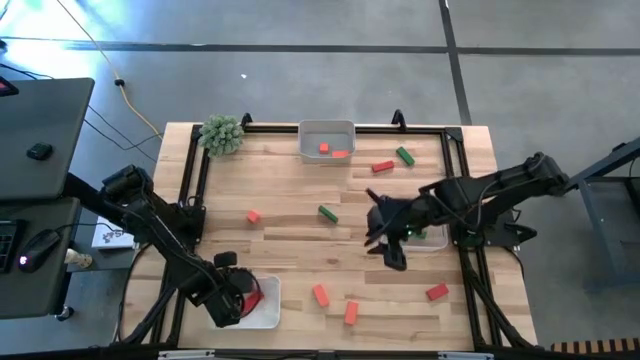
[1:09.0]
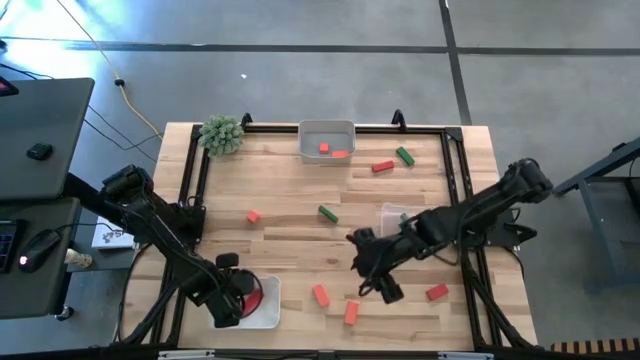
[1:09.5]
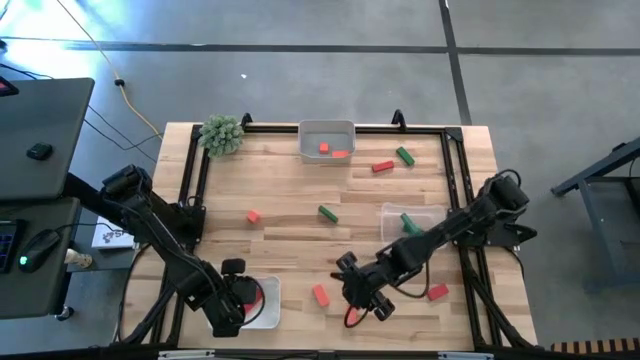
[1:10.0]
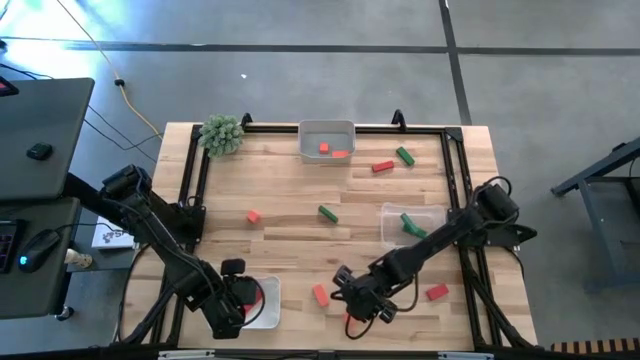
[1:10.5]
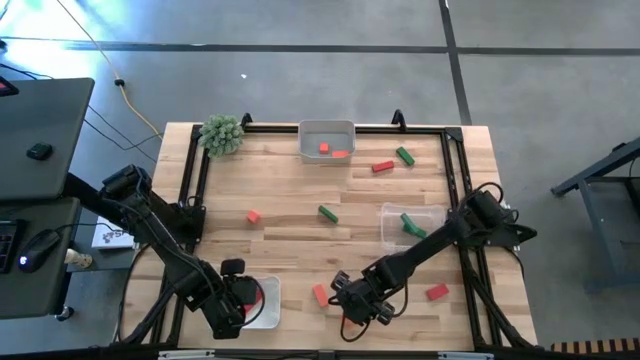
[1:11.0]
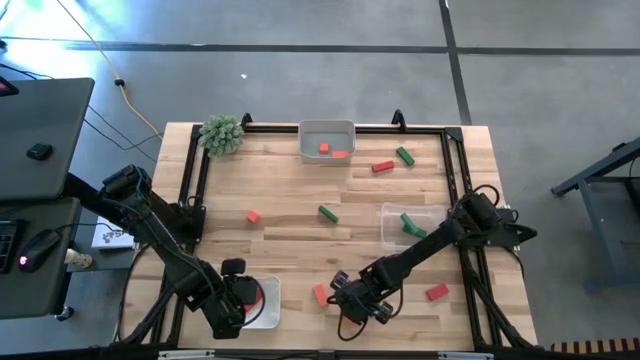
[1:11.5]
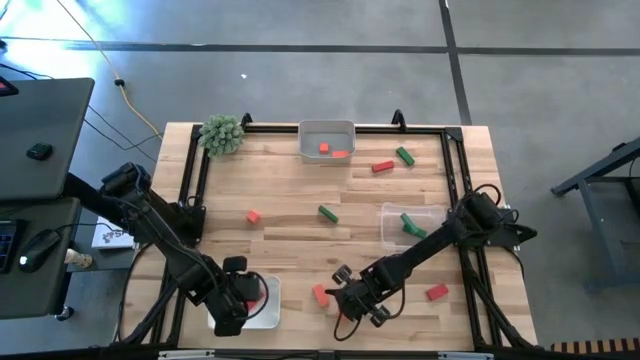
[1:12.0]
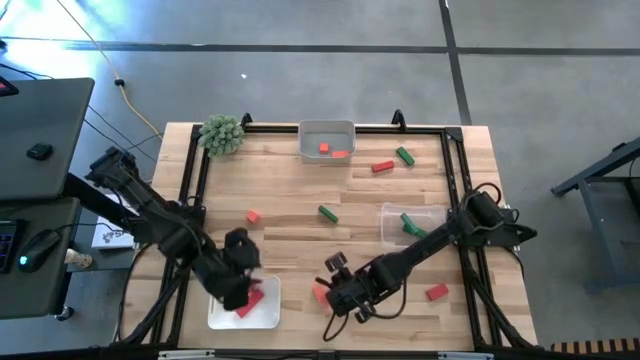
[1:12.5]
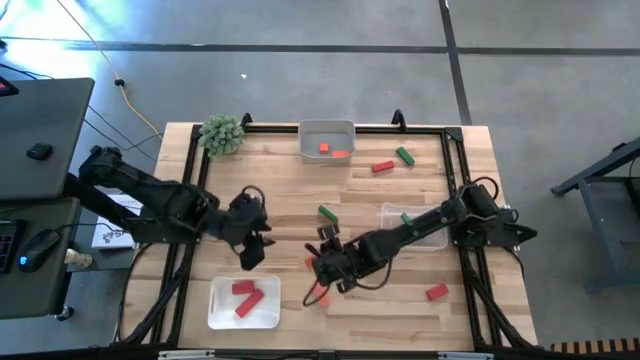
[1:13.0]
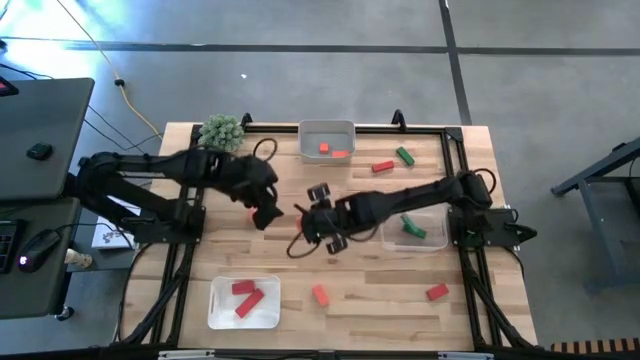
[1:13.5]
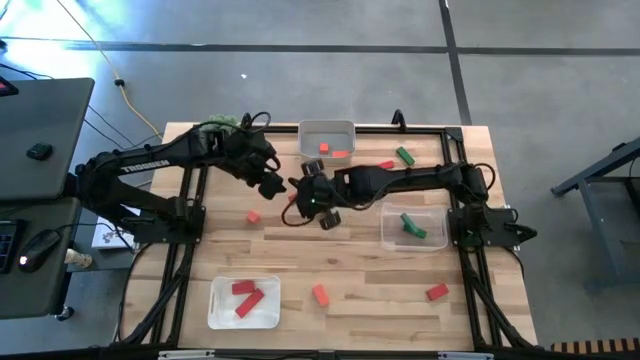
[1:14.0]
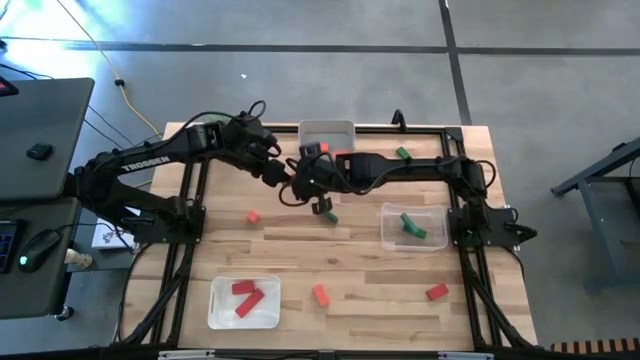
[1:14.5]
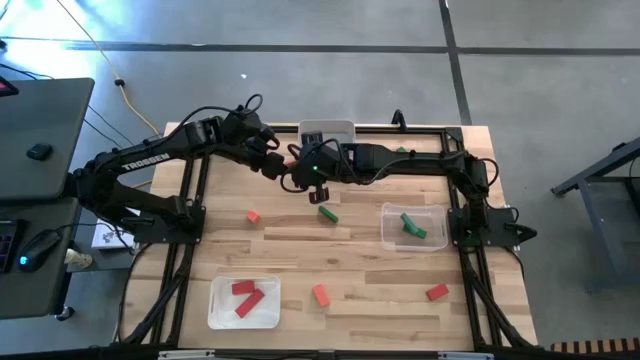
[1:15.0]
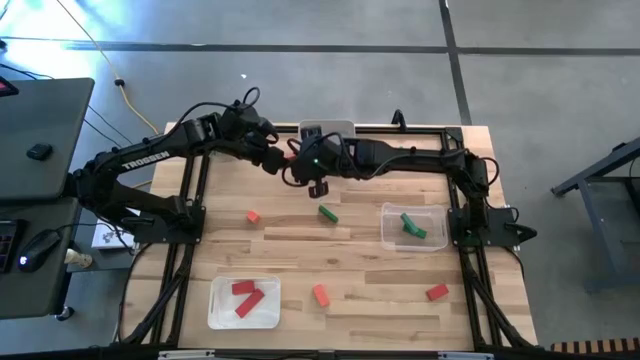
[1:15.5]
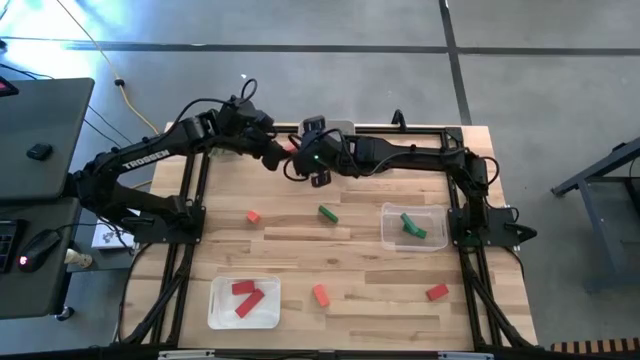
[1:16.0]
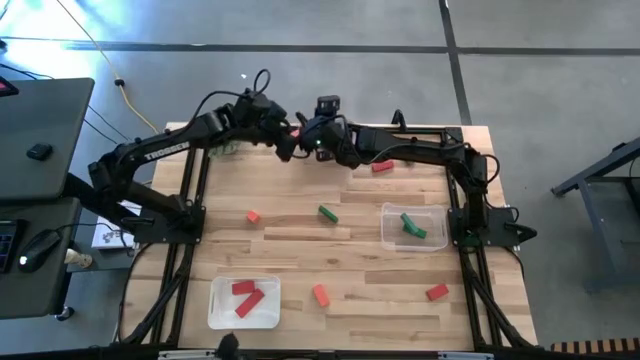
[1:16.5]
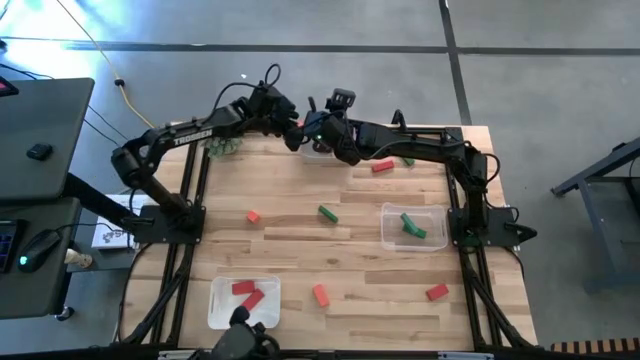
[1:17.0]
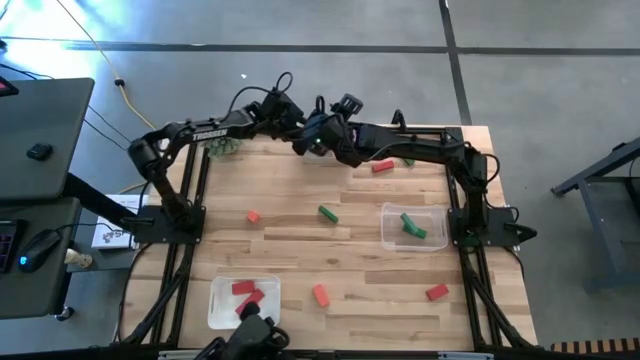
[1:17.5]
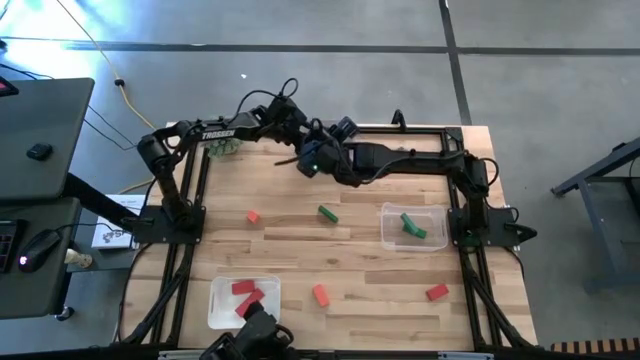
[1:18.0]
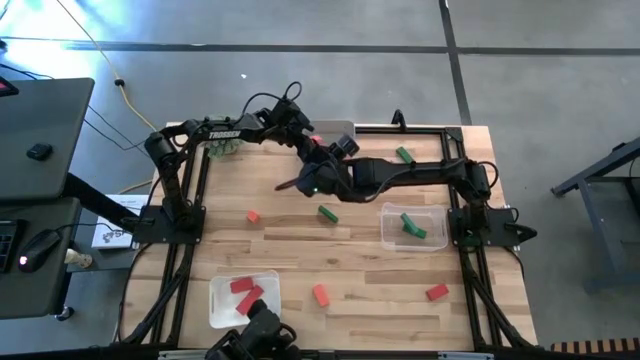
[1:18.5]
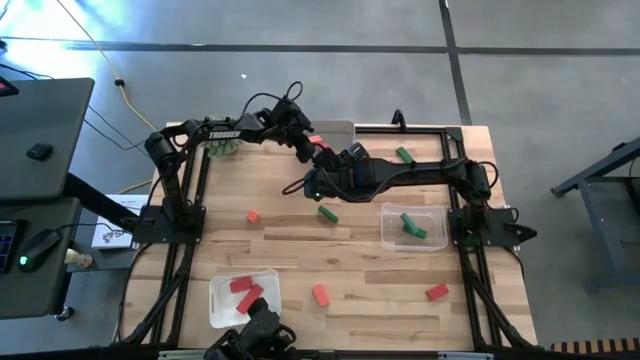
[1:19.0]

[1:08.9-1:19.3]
Task: Sort & place blocks by color
Put the orange wooden block into the gray bin

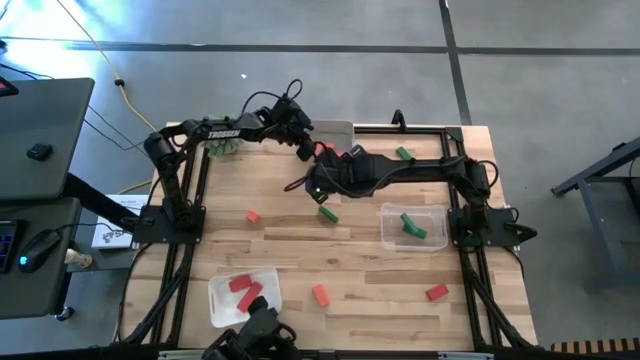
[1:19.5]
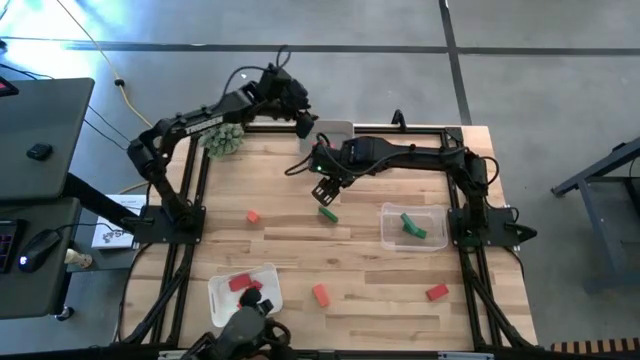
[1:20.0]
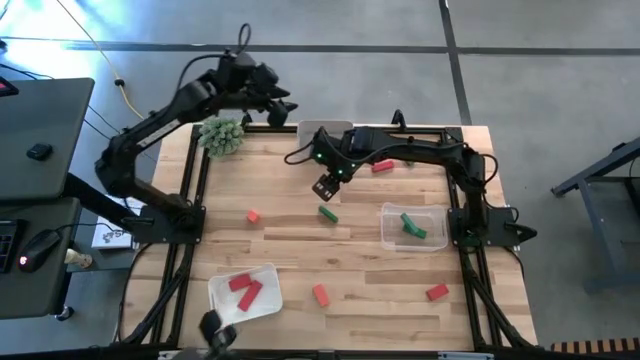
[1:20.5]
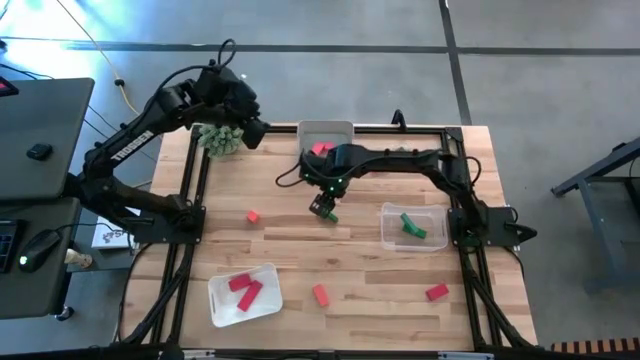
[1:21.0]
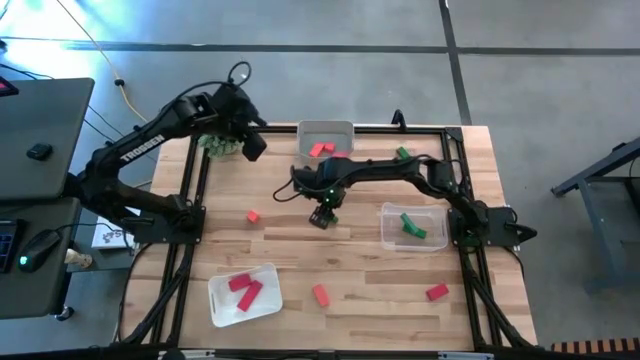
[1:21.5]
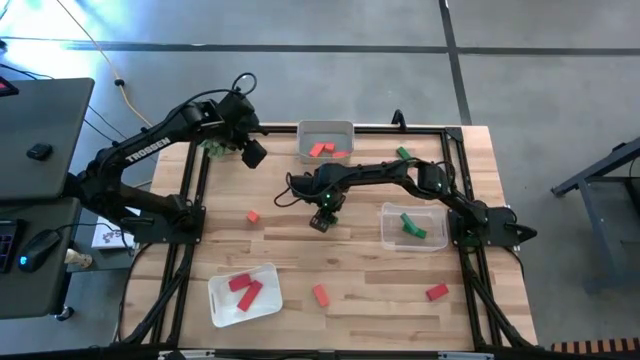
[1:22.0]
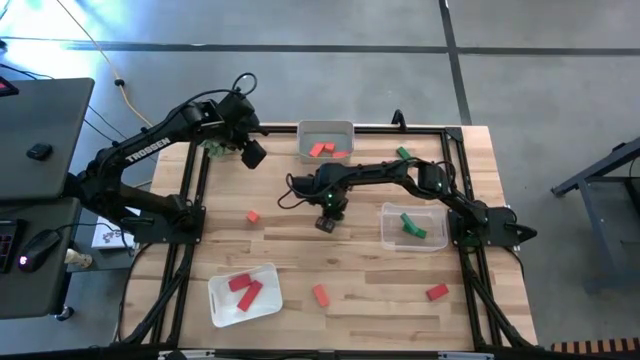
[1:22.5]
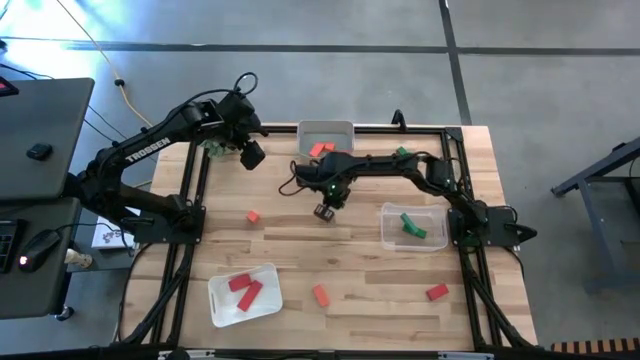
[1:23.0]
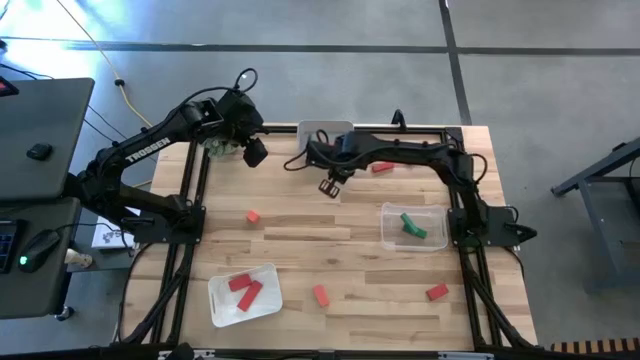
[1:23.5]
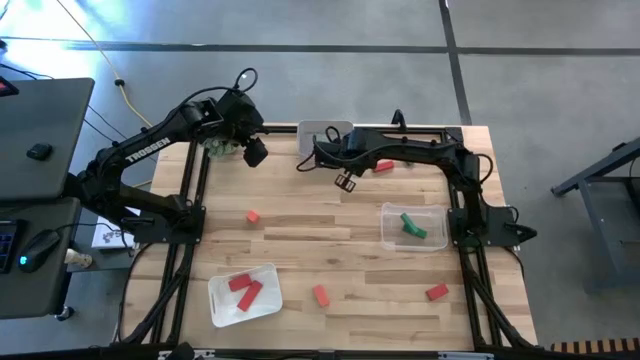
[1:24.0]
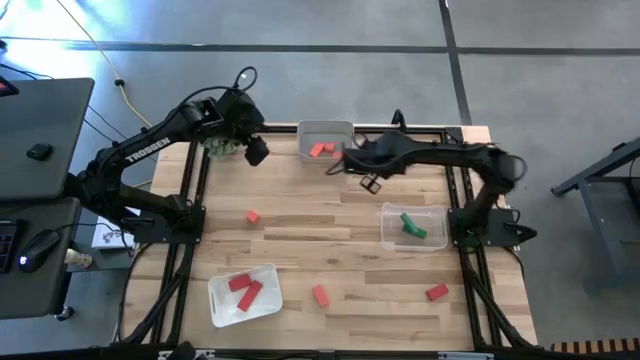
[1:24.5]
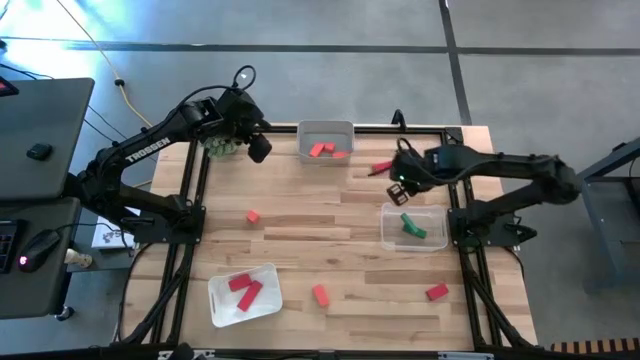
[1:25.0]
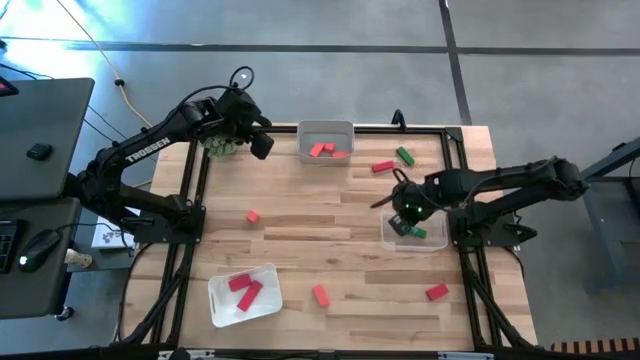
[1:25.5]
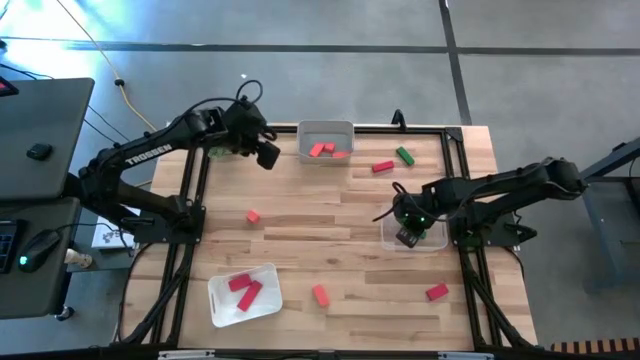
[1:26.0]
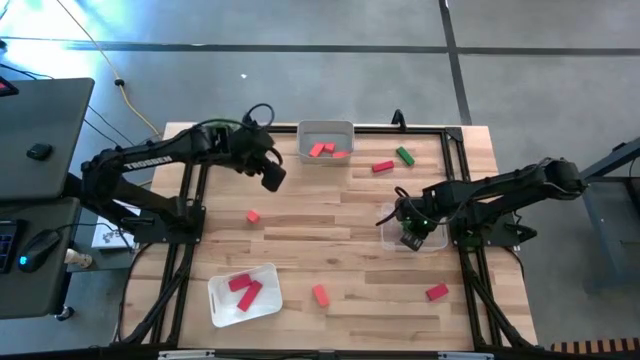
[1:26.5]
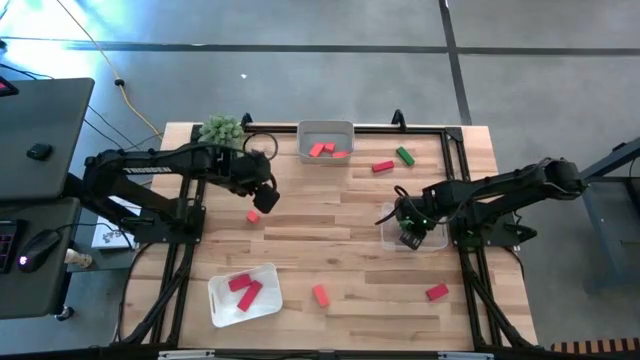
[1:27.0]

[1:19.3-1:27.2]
Put the green wooden block into the transparent bin

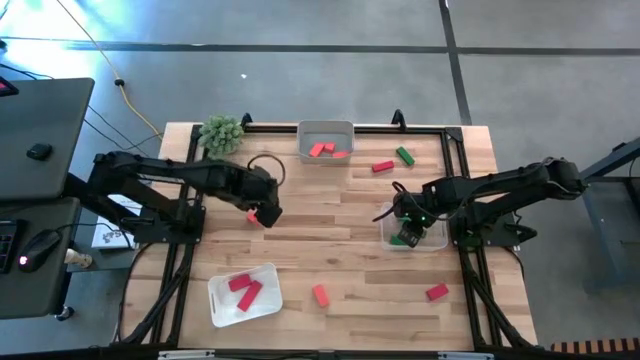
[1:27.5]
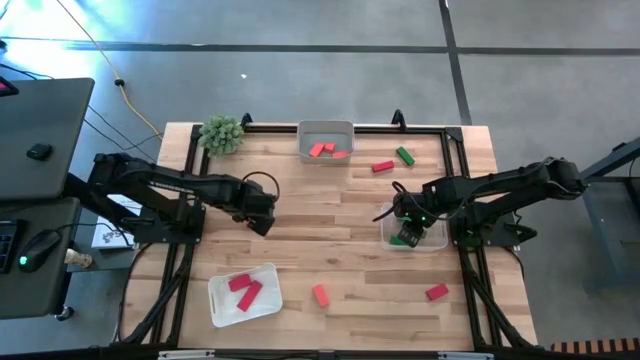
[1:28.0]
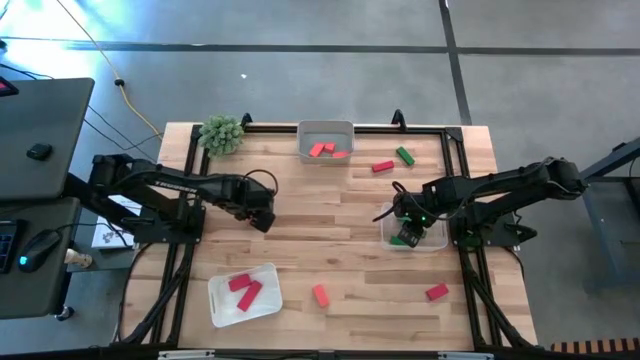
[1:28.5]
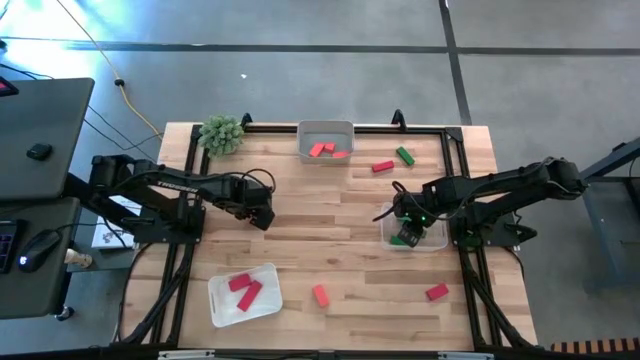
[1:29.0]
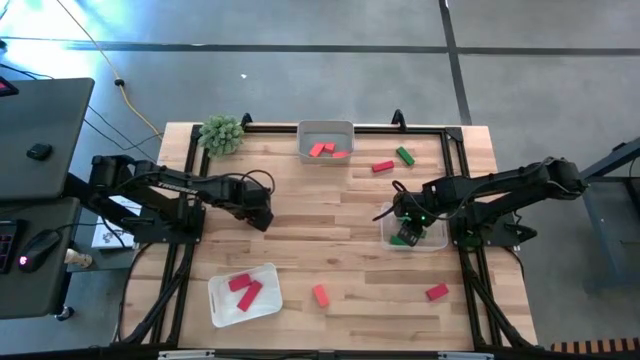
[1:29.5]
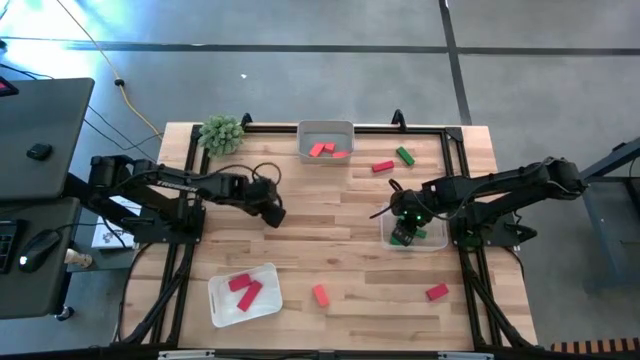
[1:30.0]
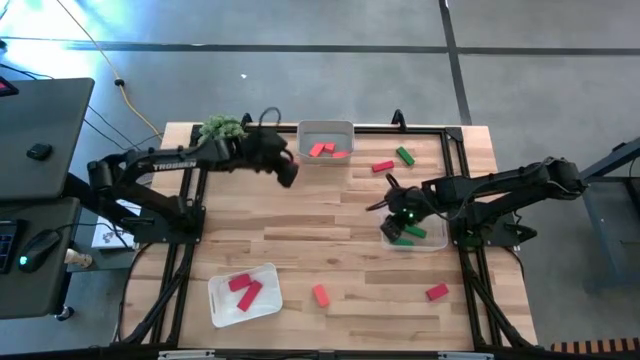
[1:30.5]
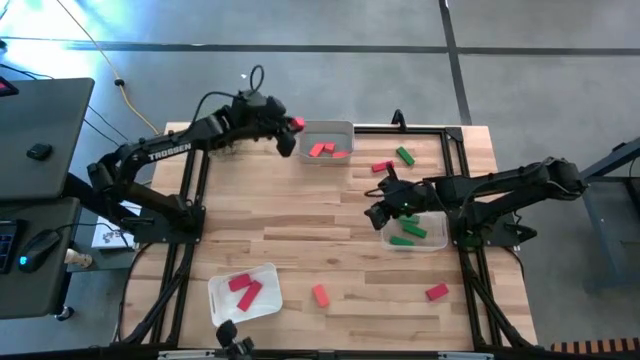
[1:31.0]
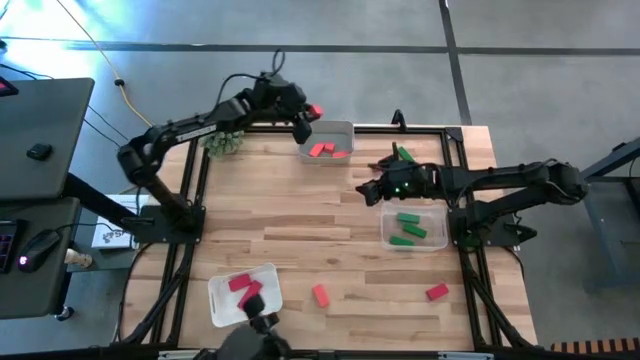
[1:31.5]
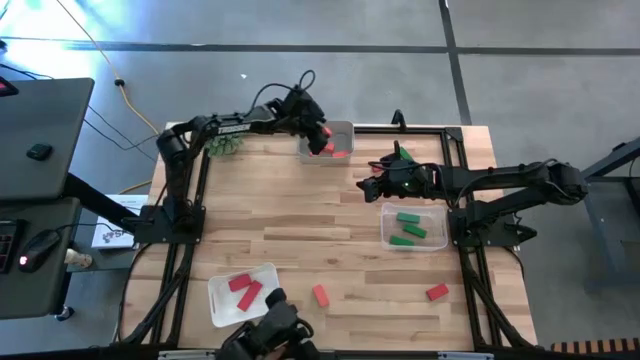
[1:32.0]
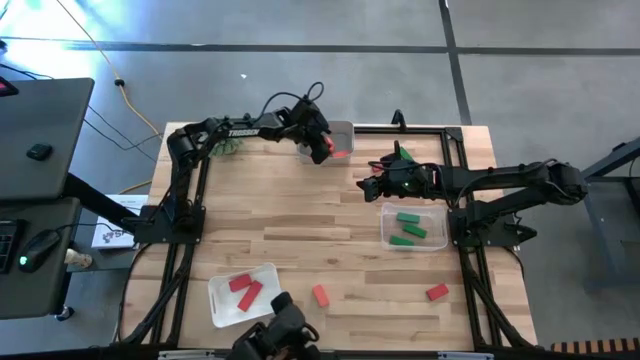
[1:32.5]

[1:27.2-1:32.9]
Put the orange wooden block into the gray bin
